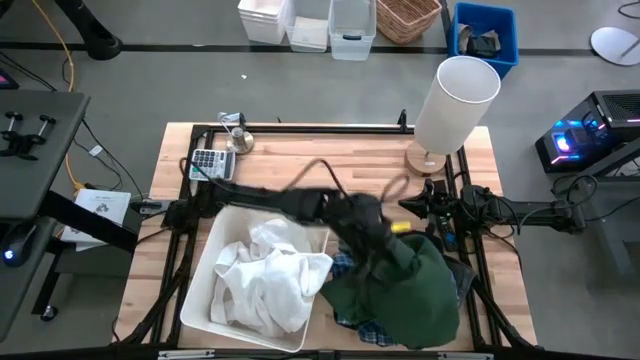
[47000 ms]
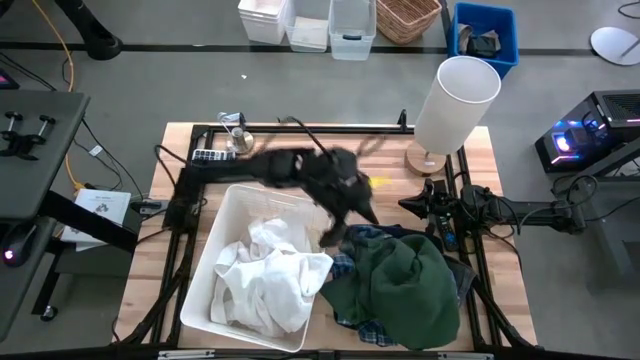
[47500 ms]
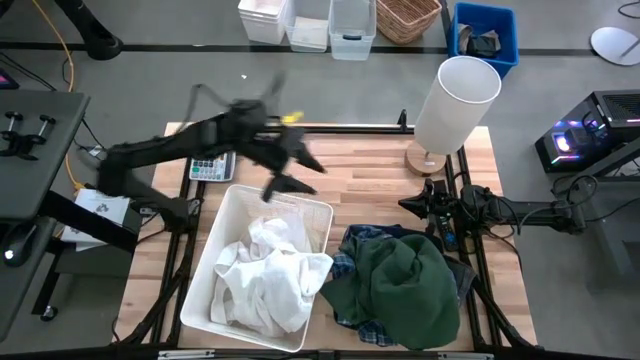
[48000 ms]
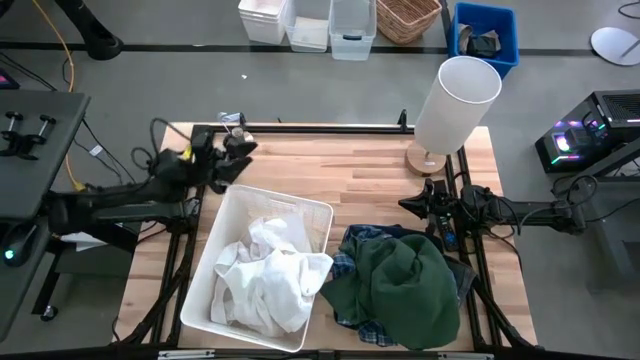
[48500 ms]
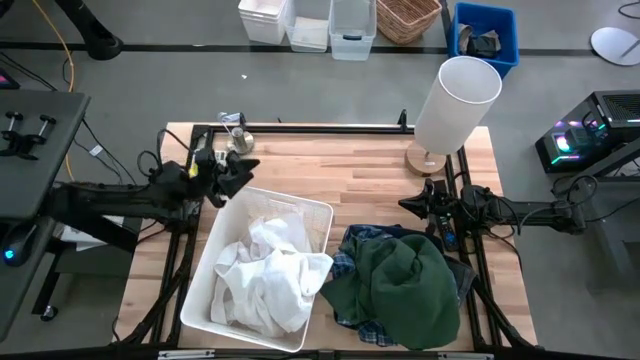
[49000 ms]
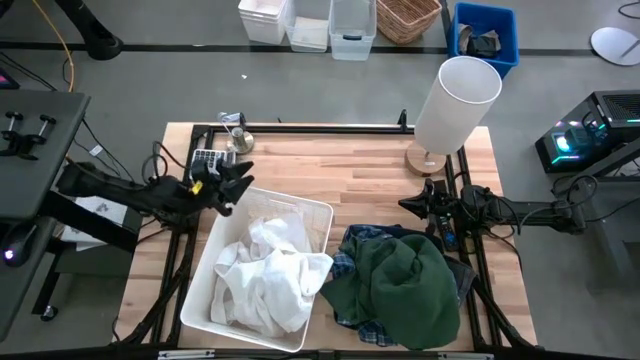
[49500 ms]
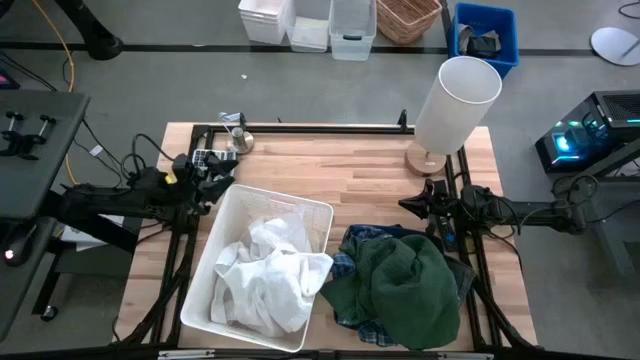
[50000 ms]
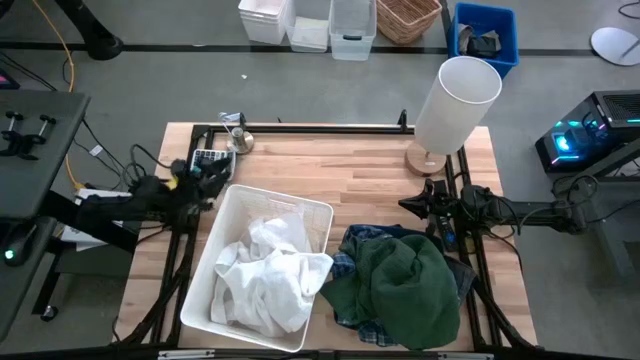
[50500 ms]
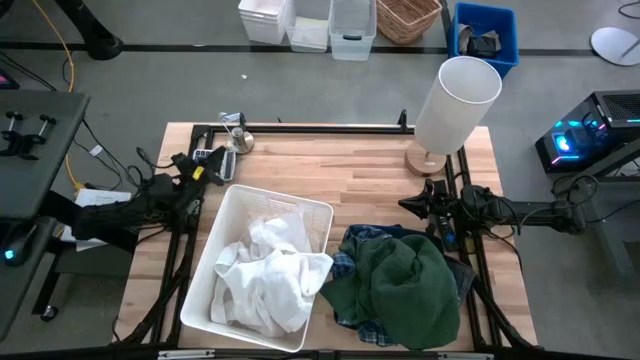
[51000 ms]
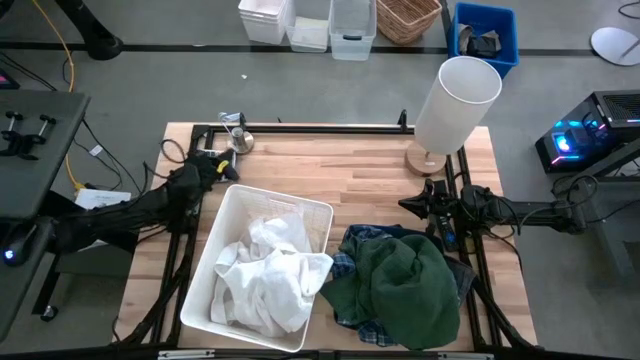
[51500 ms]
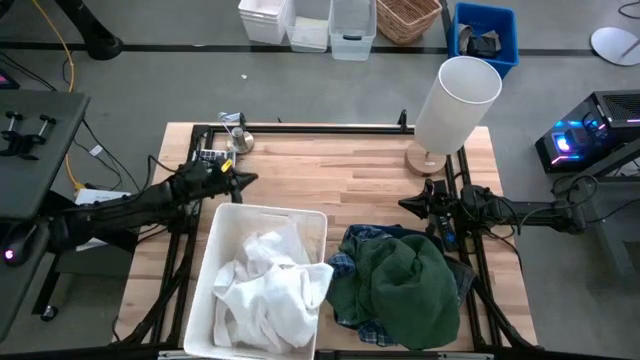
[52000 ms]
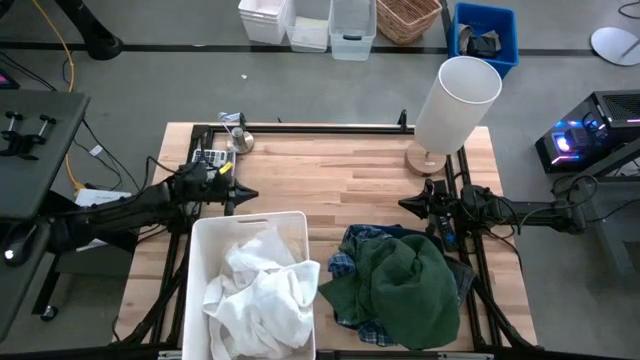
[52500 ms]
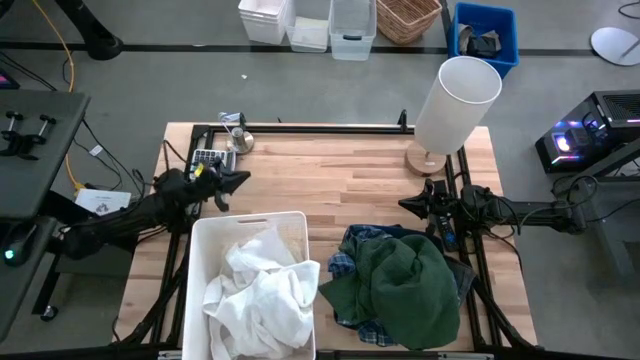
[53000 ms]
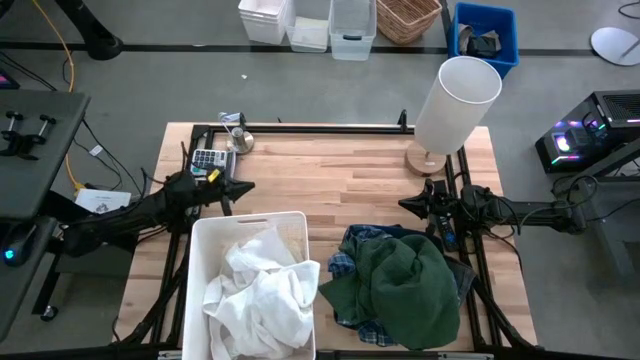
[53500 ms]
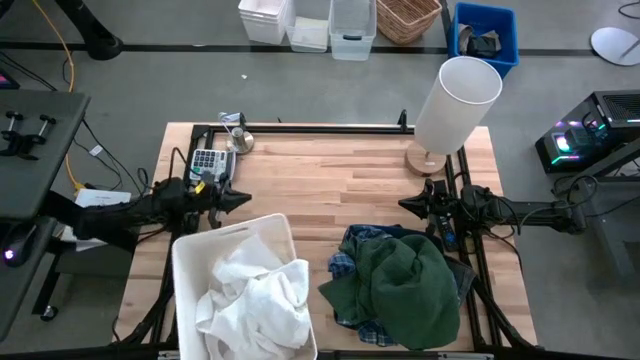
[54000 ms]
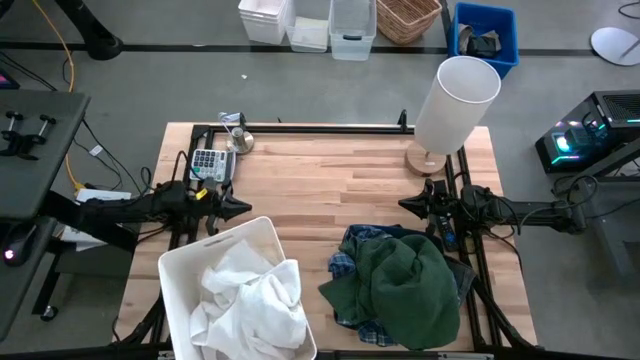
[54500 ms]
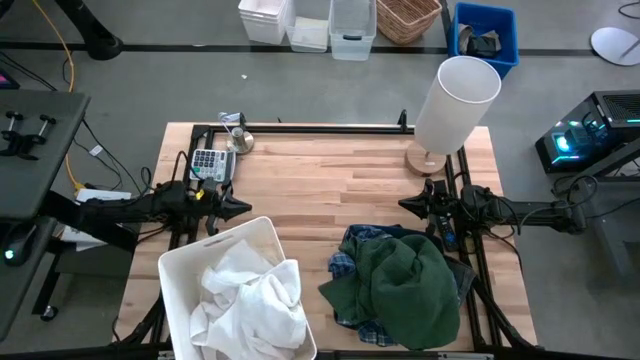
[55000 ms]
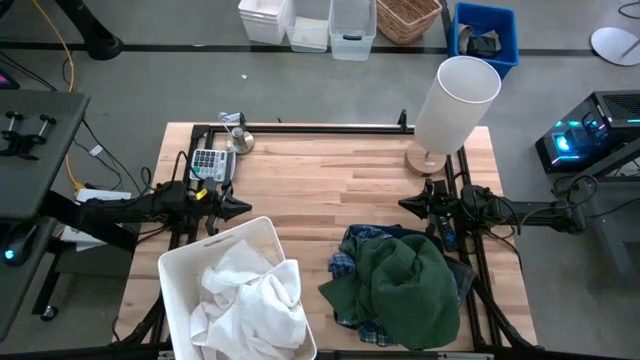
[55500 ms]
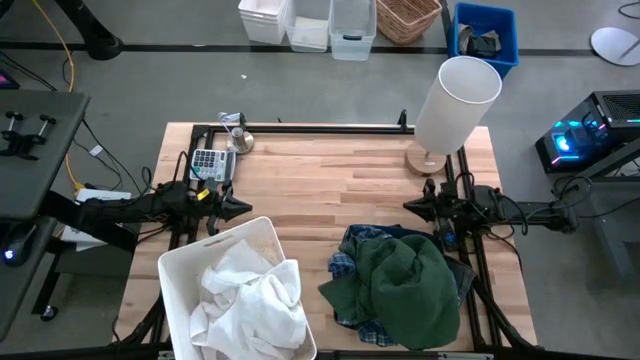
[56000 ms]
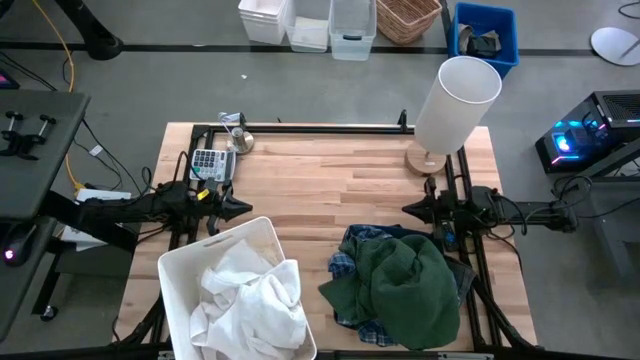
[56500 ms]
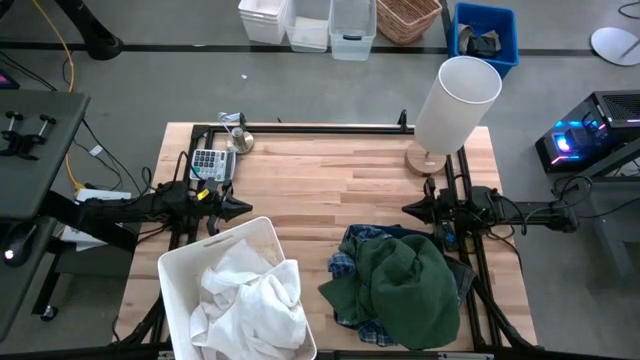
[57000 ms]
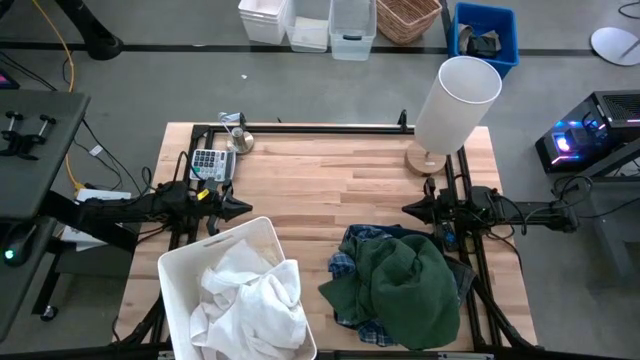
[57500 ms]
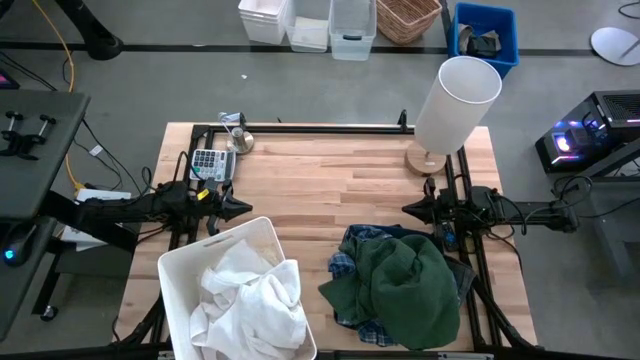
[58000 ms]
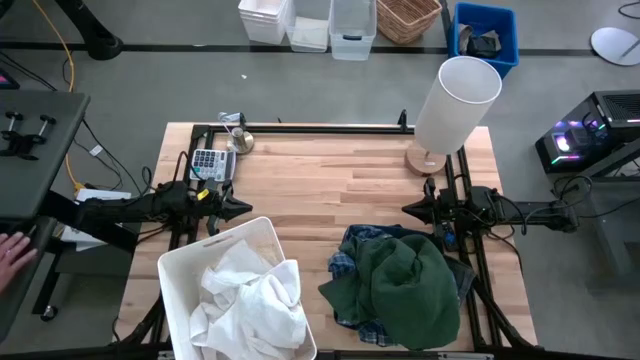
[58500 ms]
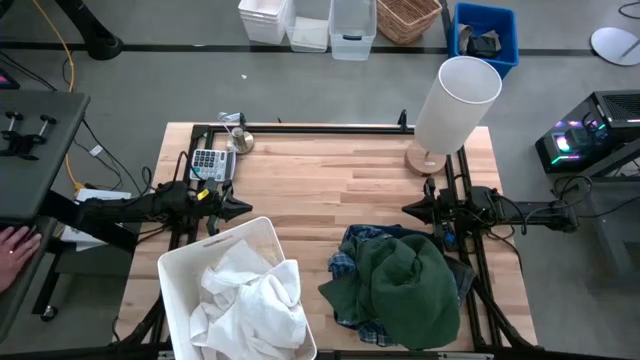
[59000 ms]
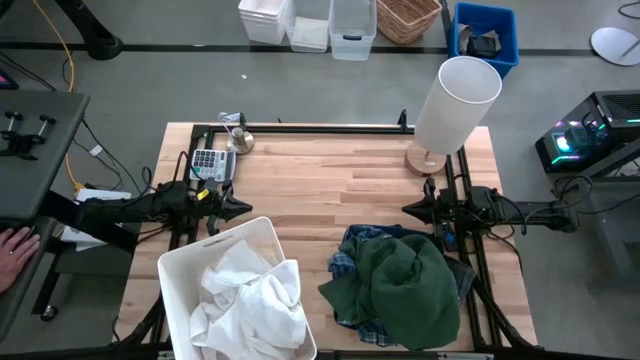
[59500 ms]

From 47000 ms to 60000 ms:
Task: Sort clothes
Return to Home Position

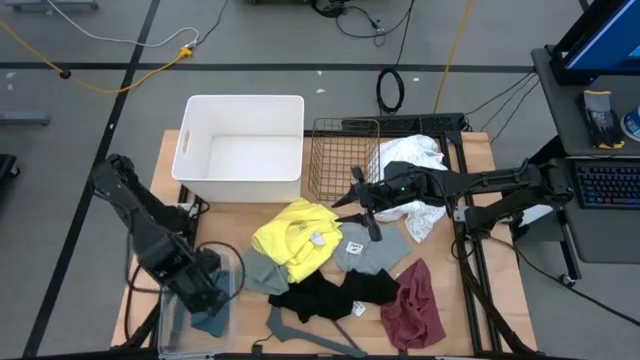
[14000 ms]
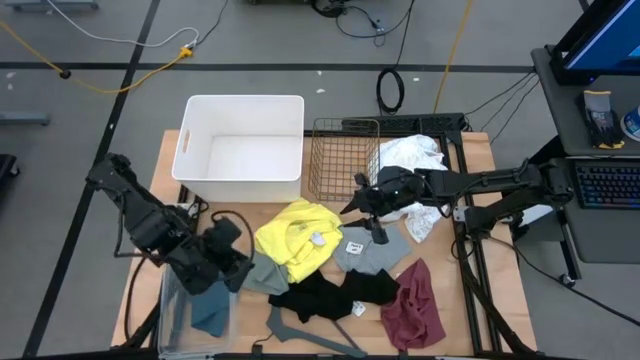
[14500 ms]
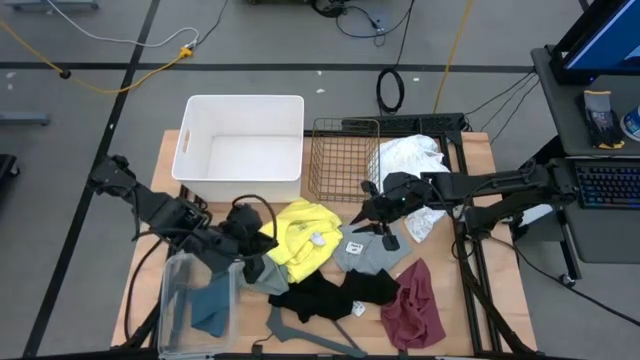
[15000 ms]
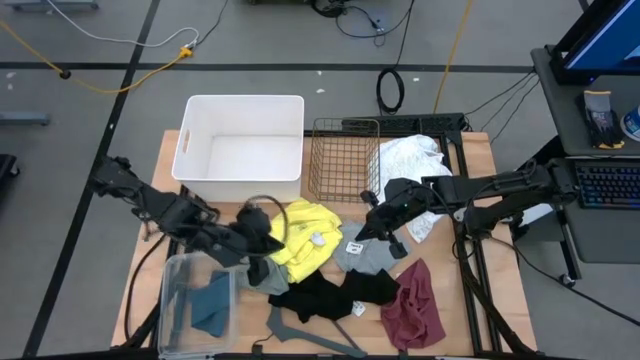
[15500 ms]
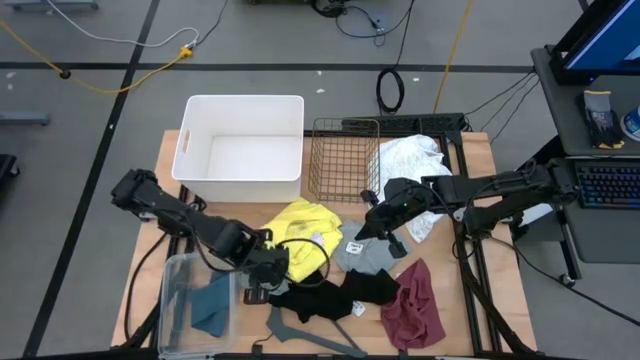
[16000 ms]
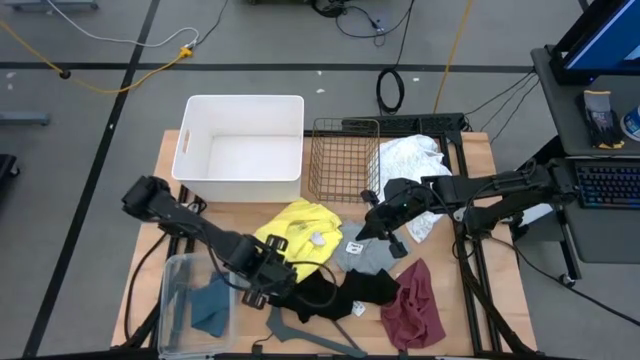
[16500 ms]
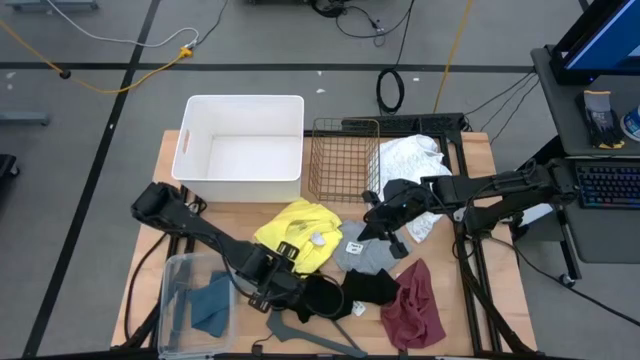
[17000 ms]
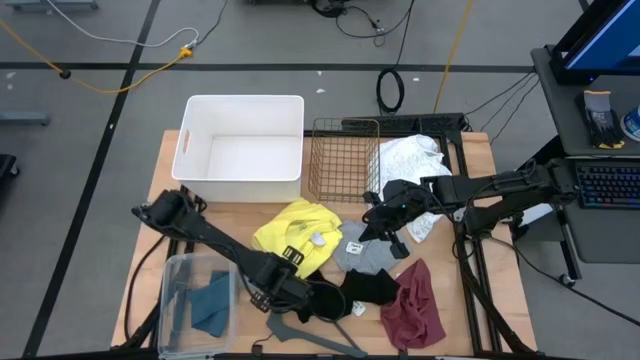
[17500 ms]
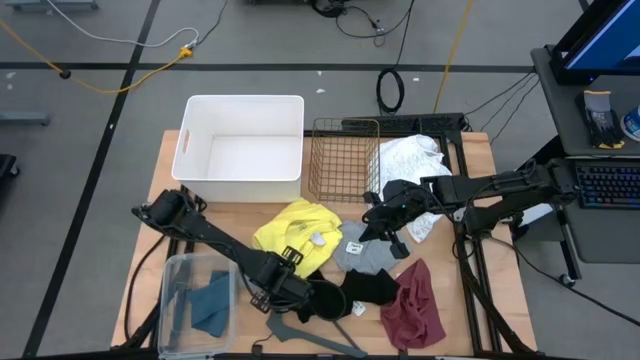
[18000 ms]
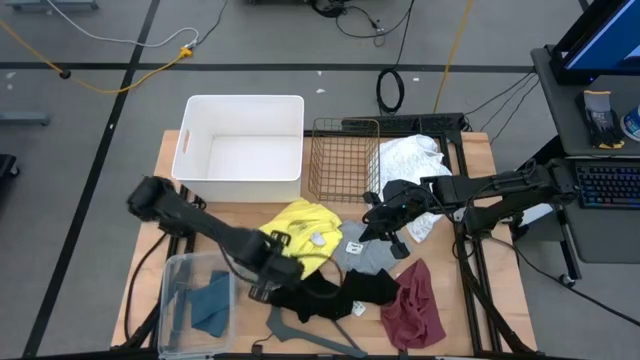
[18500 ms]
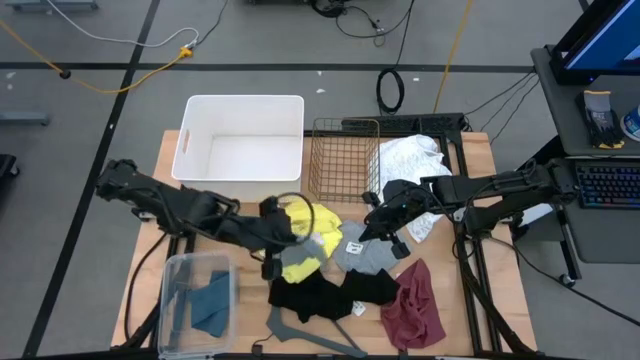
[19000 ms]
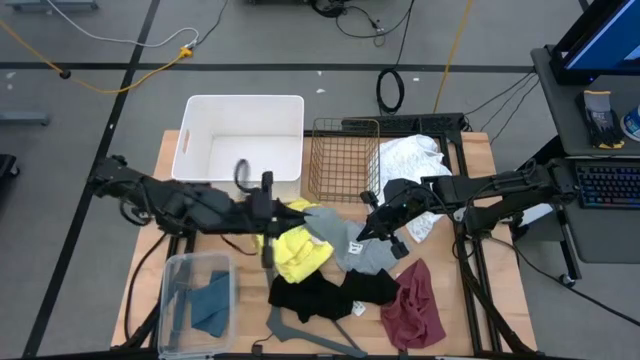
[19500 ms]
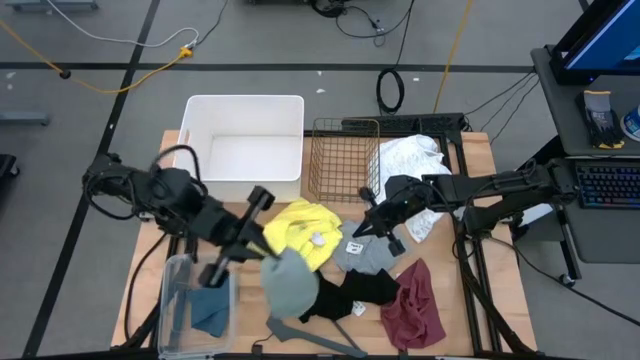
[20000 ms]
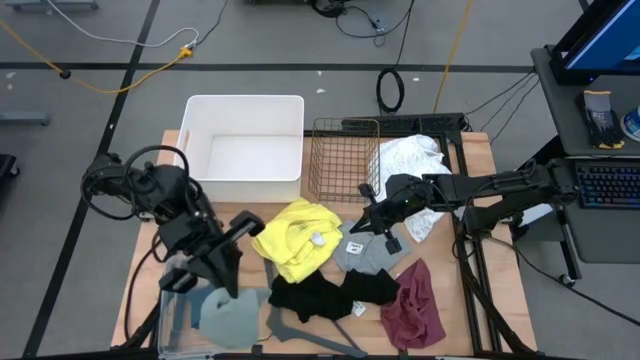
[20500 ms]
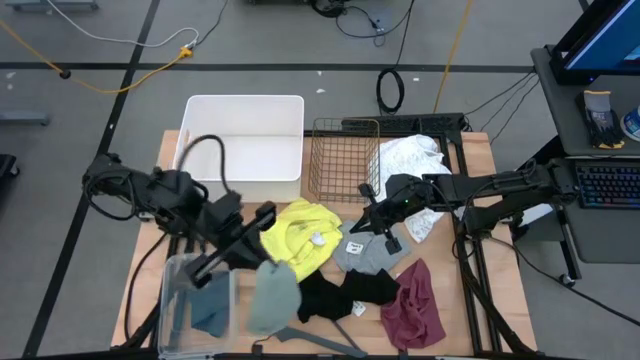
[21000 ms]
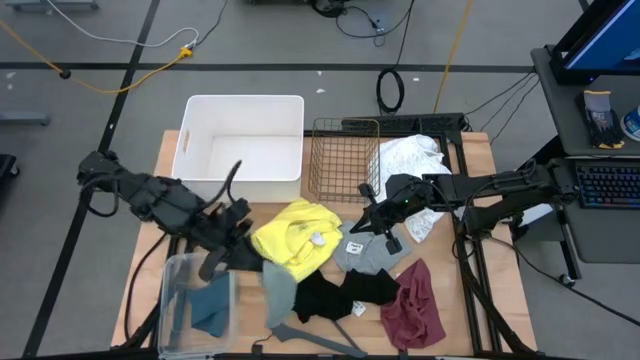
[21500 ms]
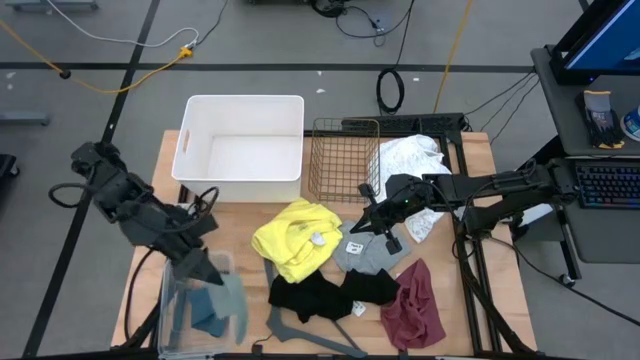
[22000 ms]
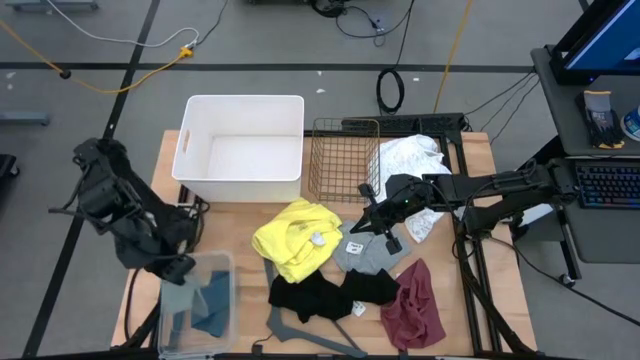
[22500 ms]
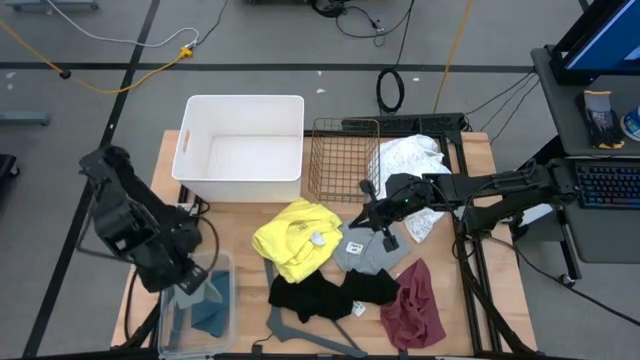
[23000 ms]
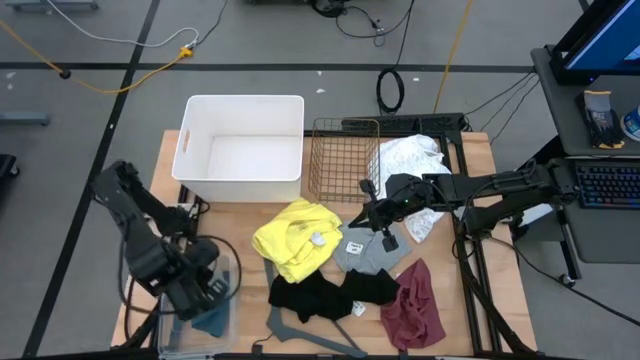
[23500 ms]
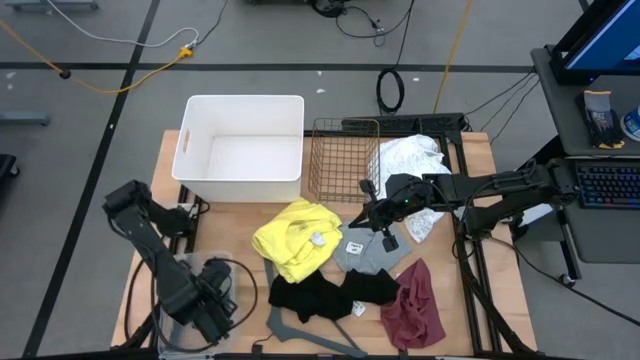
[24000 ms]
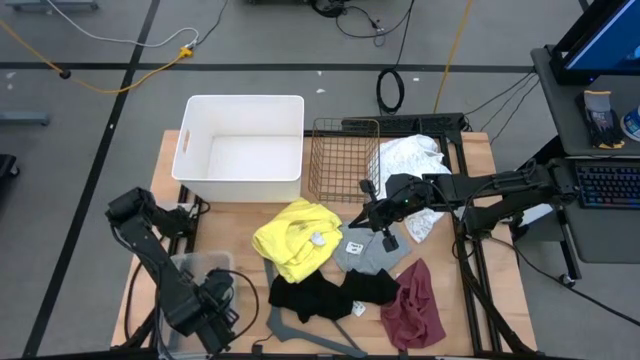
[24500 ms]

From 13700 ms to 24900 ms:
Task: Pick & Place Cloths
Put the gray sock into the transparent bin
